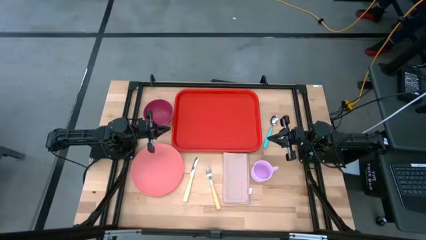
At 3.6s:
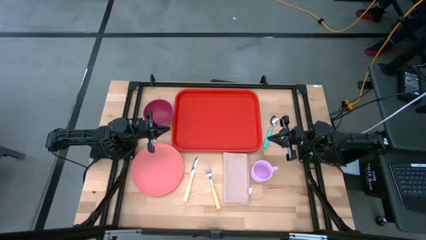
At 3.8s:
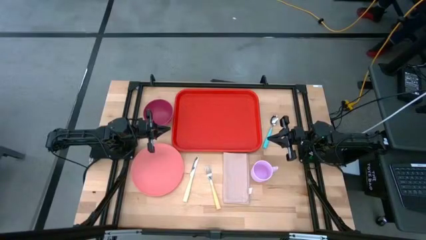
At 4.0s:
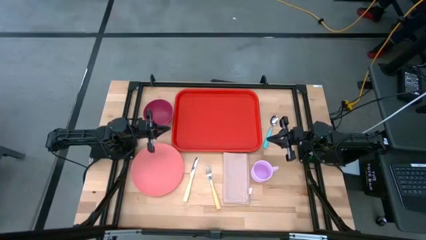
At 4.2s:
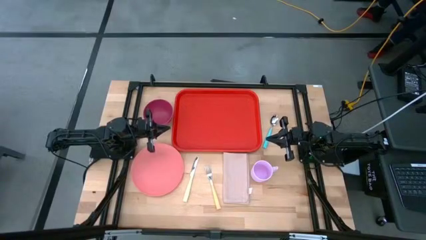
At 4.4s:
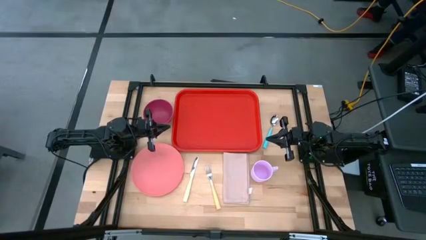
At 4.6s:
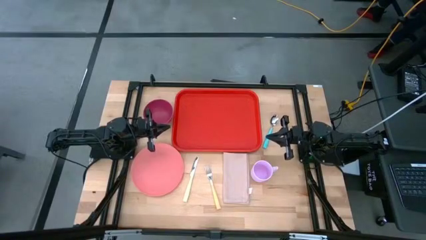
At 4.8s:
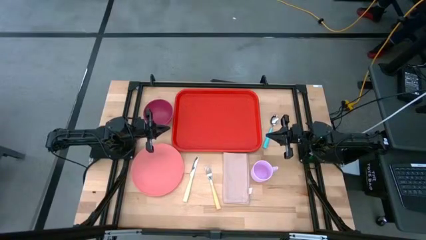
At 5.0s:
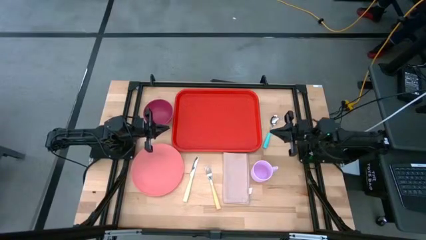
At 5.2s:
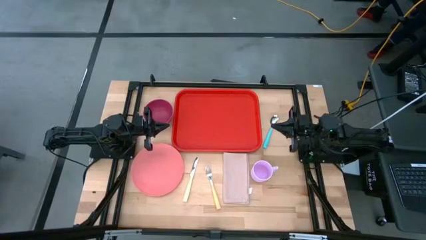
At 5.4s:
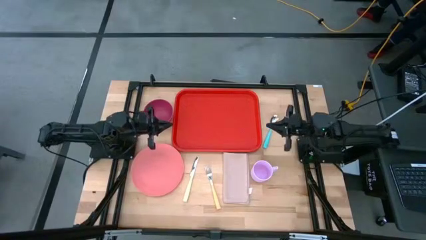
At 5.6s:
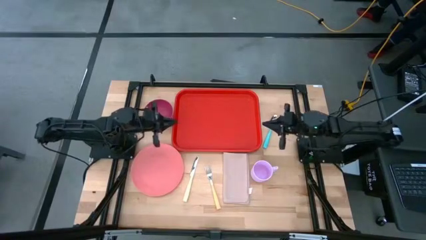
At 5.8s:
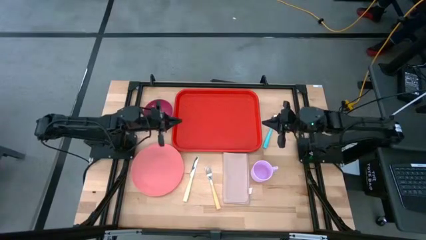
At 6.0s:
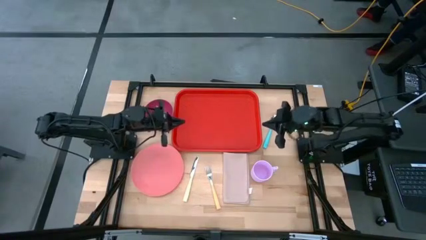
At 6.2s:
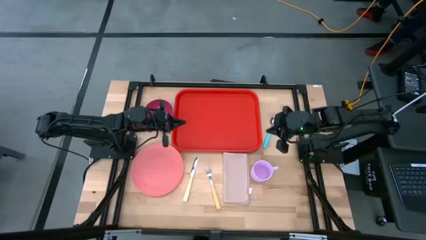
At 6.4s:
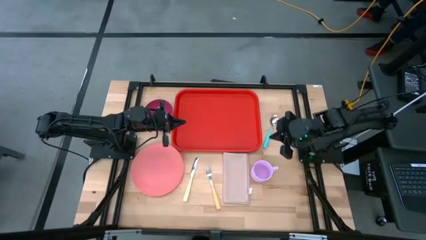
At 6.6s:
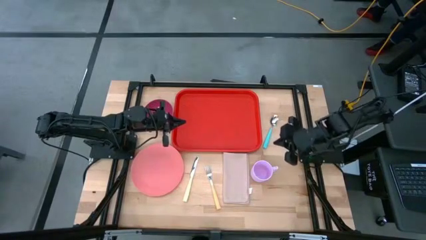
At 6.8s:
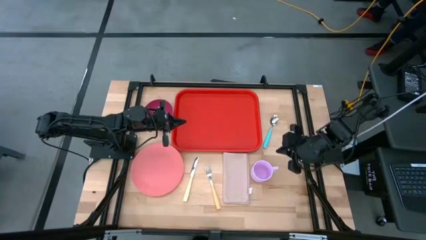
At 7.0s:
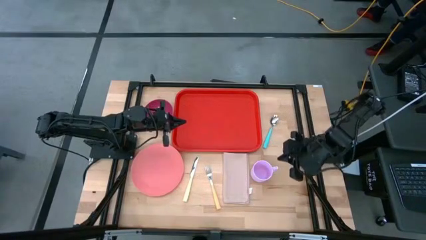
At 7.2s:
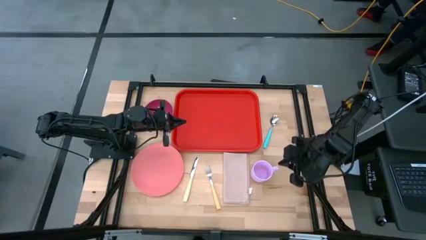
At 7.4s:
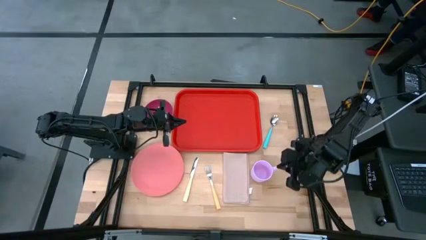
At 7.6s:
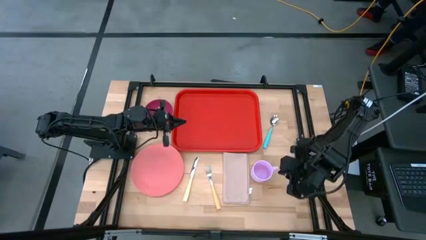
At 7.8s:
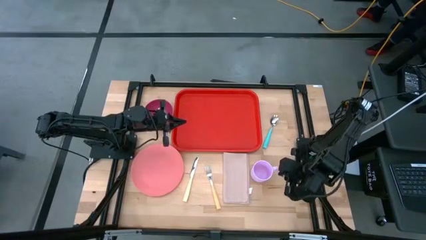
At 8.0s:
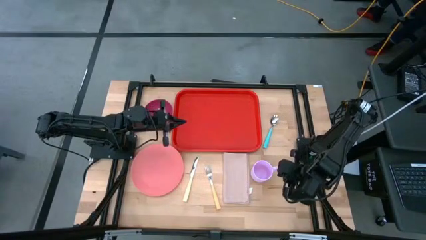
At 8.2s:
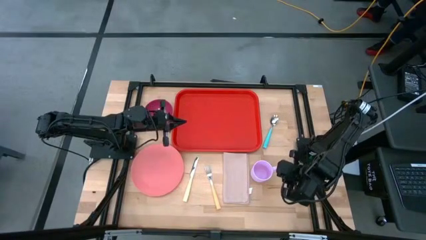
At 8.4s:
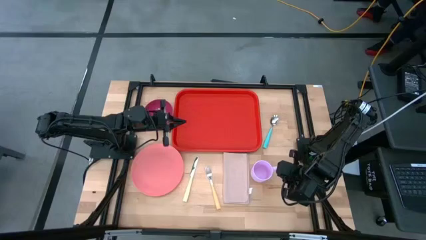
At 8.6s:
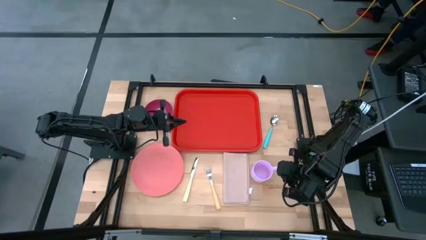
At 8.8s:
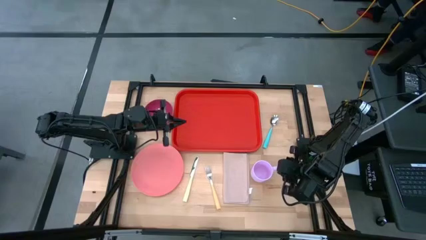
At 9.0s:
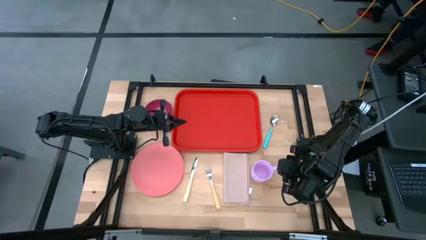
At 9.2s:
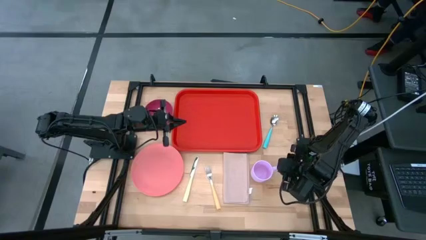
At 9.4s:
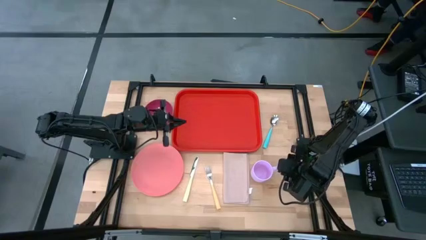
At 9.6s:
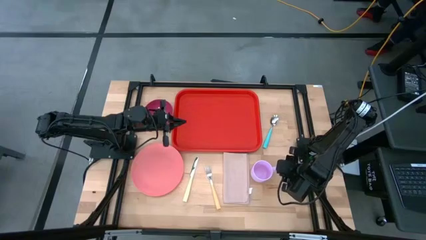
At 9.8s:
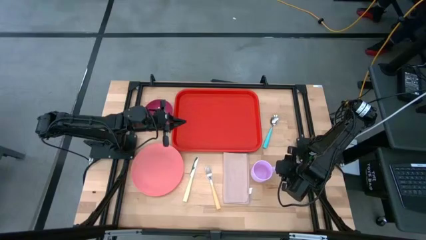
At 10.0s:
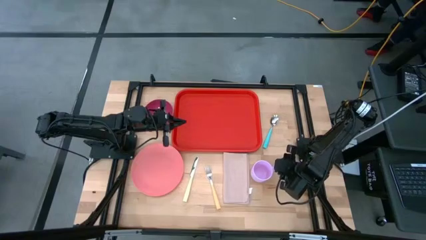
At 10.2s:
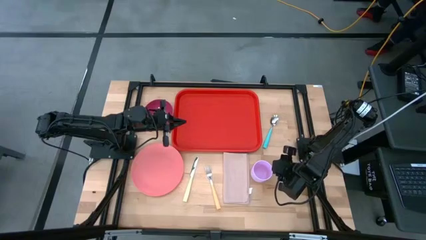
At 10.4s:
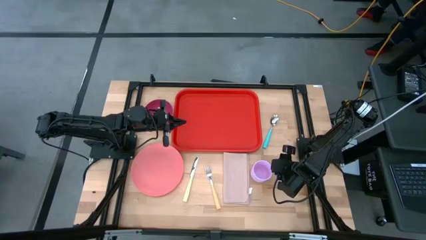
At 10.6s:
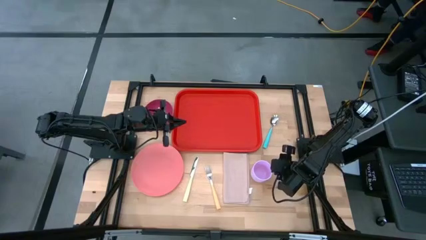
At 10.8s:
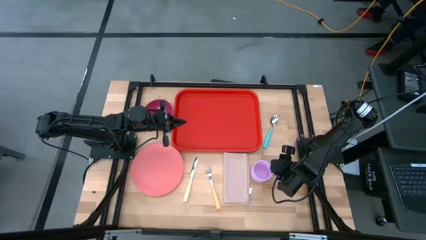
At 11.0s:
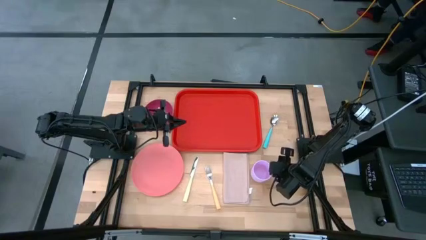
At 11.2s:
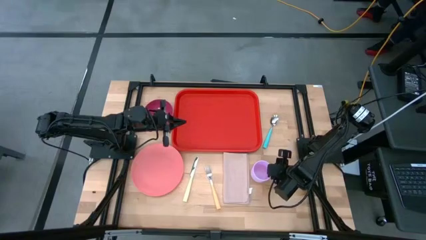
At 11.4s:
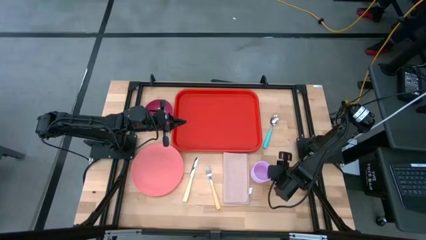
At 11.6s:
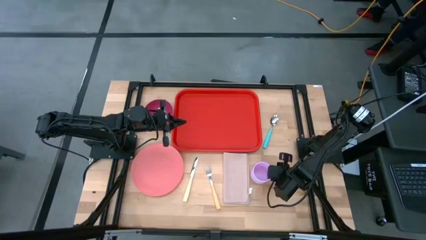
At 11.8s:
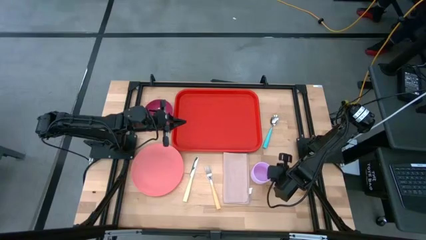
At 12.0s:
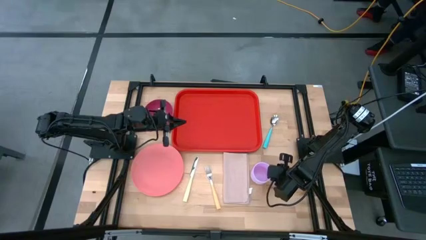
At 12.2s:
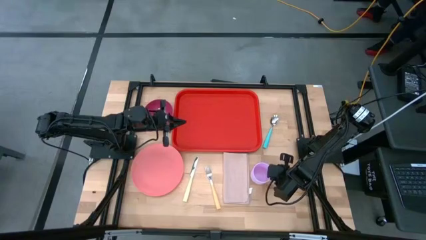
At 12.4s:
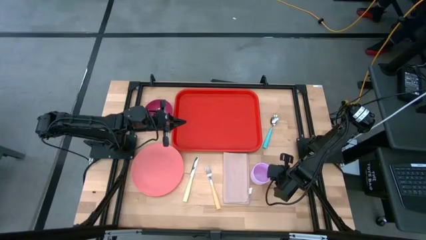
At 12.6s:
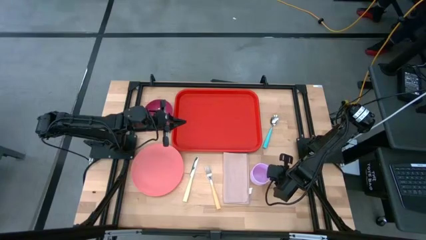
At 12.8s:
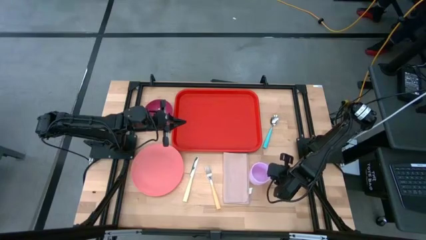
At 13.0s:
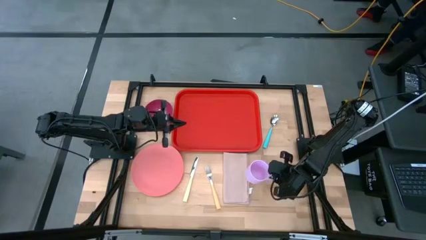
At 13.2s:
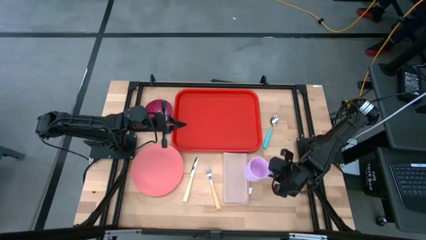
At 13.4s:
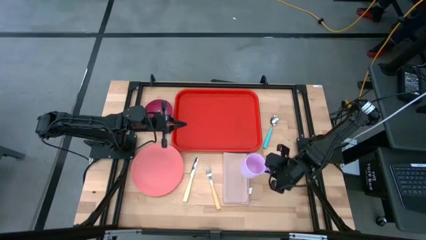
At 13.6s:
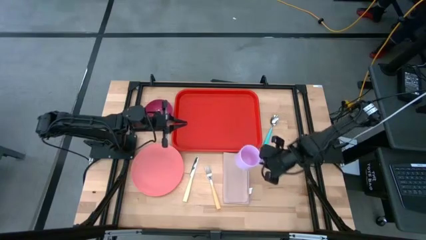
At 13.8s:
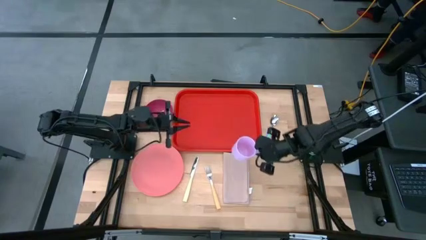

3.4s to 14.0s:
Task: Set up tray
Put the purple mug on the top left of the orange tray

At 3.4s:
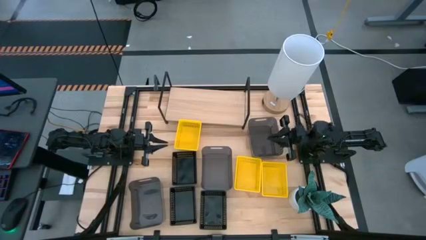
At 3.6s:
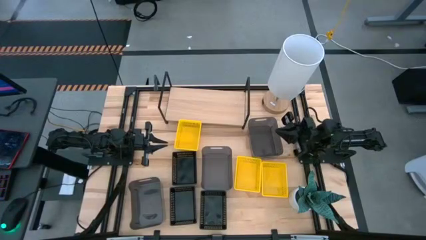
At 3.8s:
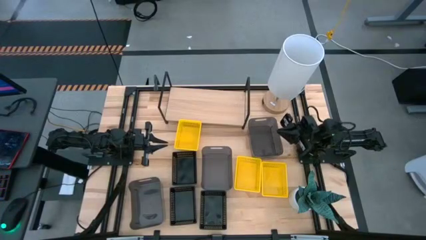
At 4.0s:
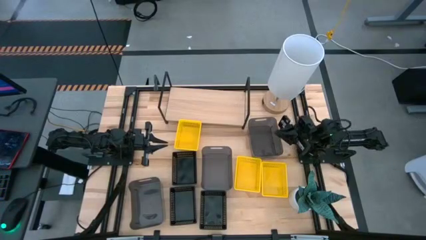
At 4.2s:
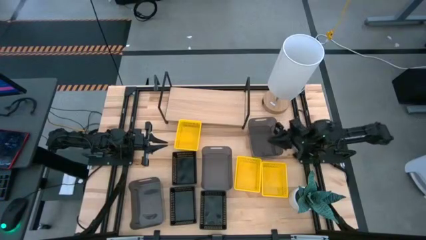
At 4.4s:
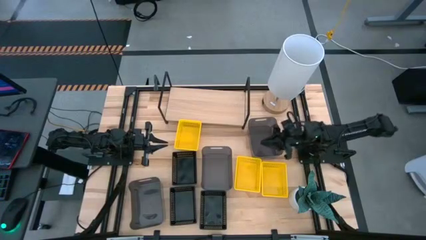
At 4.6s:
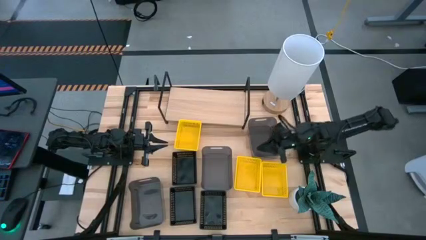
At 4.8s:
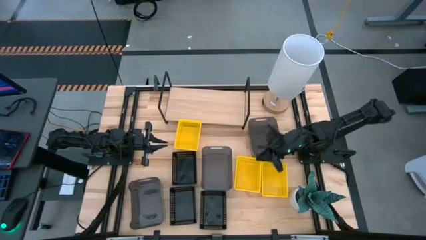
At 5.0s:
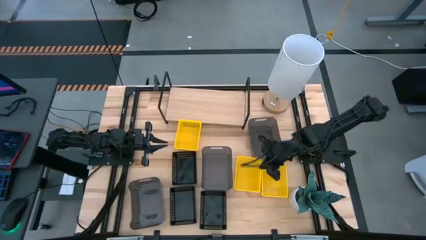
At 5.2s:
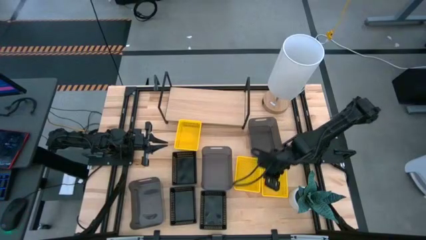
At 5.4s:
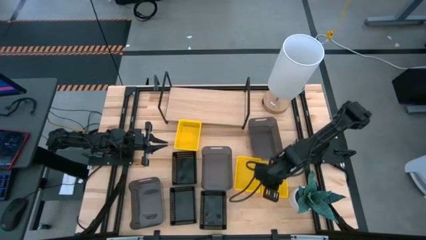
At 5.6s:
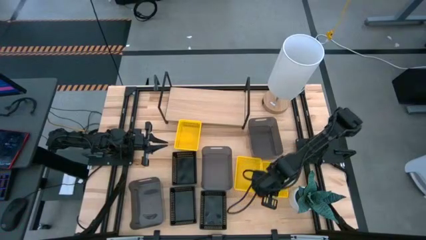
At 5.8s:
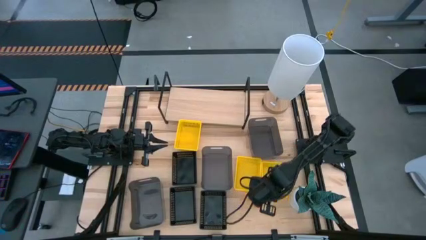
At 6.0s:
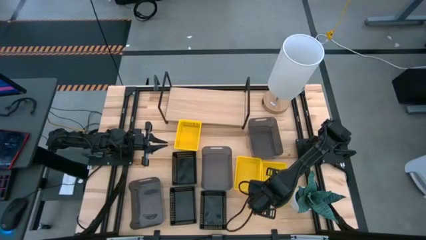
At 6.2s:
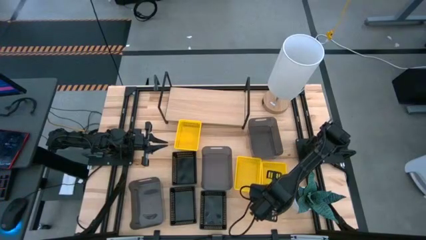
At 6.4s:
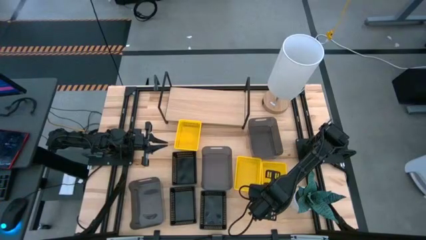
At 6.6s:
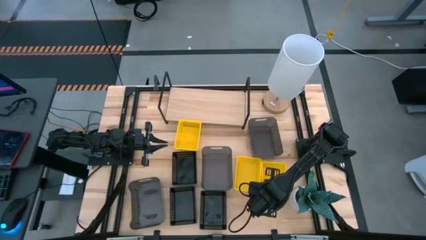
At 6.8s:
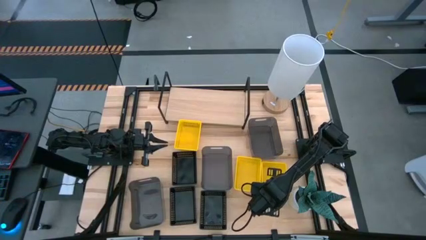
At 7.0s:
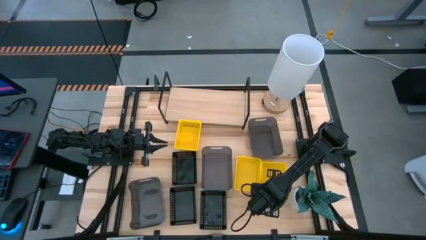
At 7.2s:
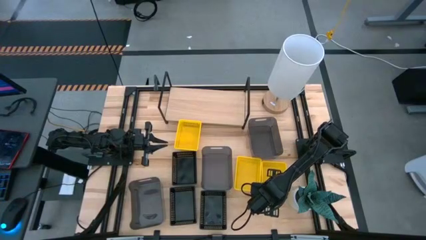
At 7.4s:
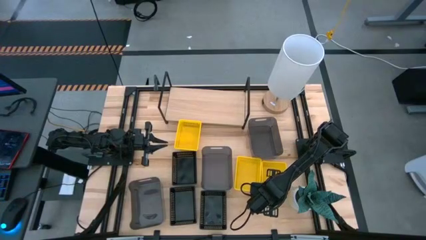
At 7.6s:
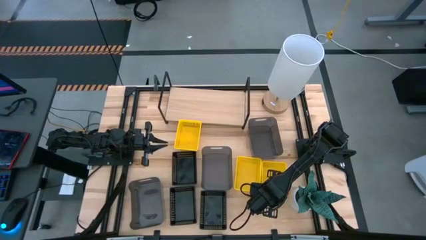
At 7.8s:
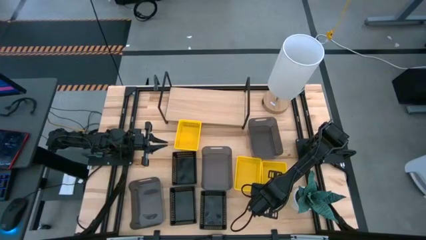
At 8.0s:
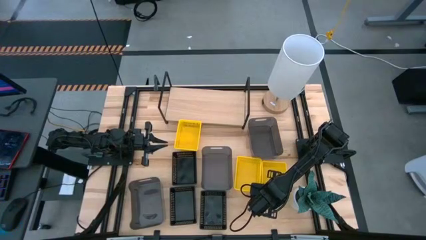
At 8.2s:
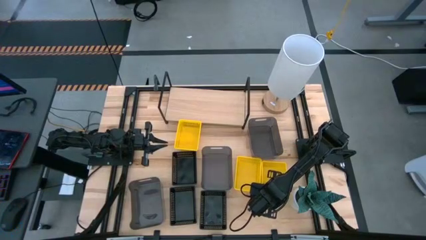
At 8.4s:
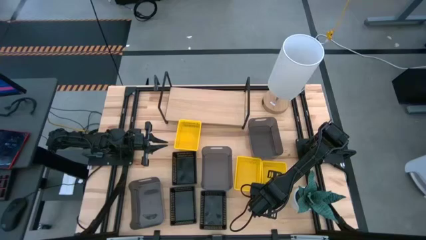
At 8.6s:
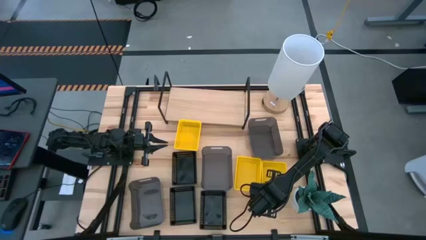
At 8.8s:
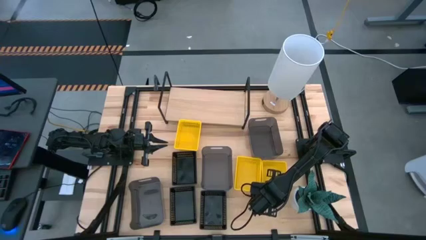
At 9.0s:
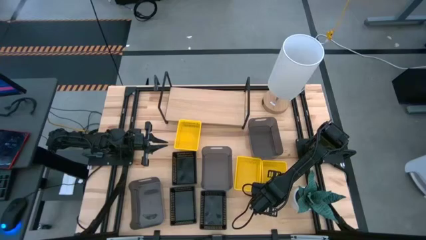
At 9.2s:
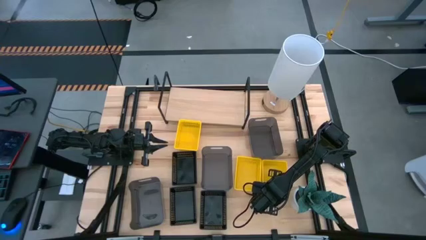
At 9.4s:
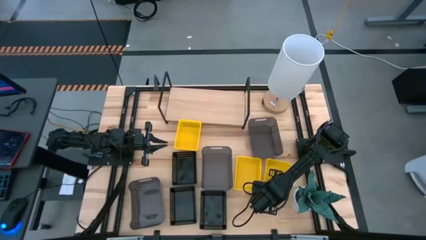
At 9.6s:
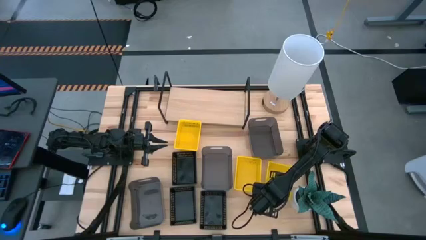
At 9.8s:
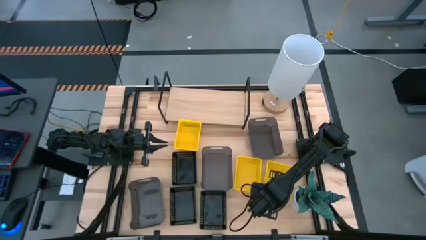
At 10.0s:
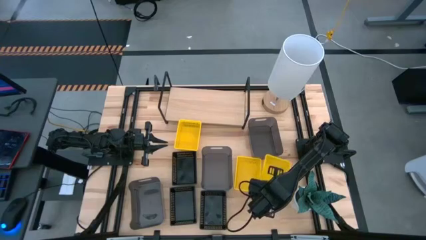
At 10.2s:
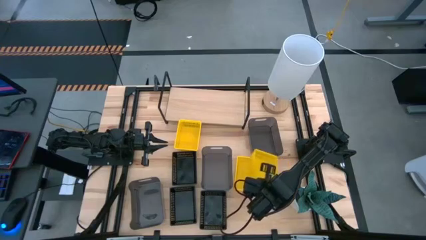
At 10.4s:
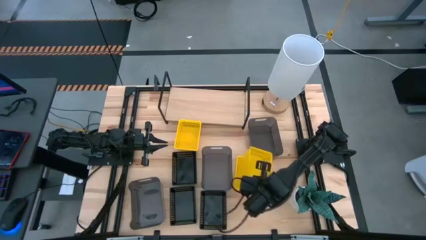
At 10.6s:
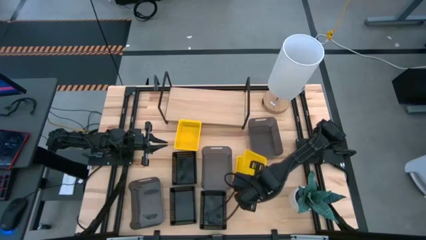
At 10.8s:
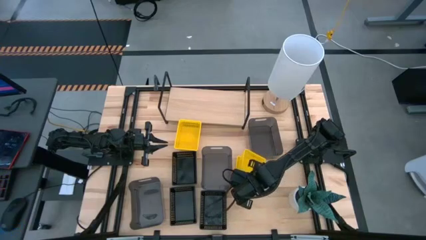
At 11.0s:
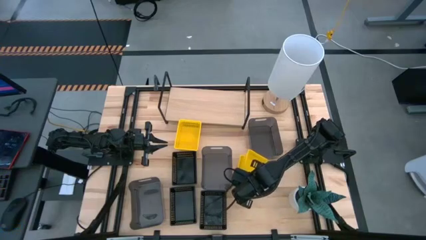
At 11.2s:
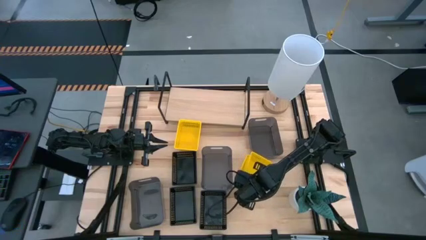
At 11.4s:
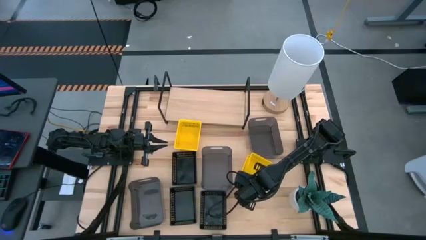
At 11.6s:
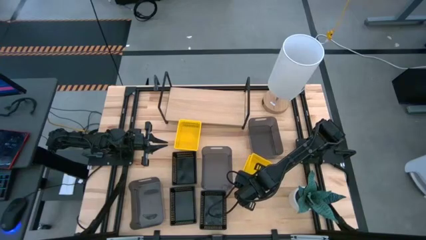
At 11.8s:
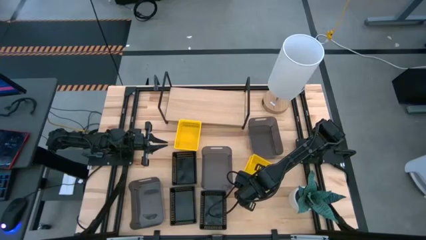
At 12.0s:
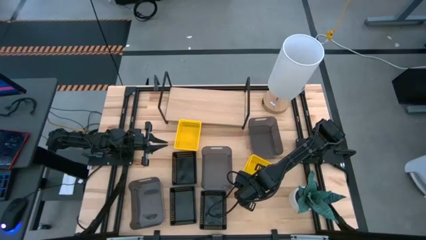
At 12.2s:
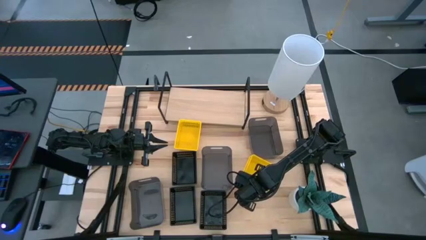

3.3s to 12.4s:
Task: Stack baskets on shelf by color
Stack the right yellow bin on top of the left yellow bin
